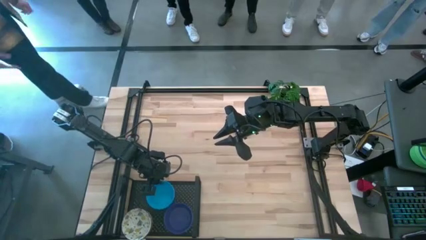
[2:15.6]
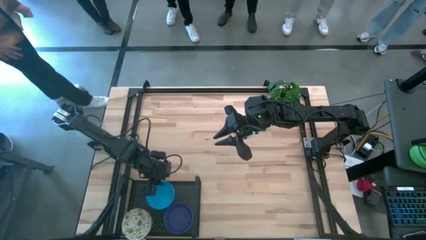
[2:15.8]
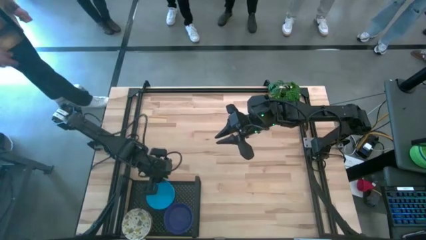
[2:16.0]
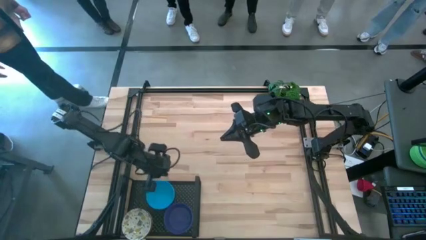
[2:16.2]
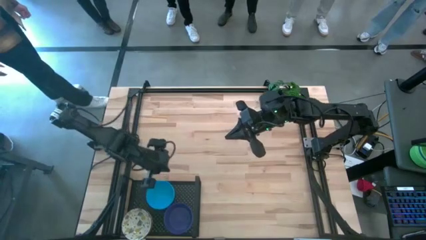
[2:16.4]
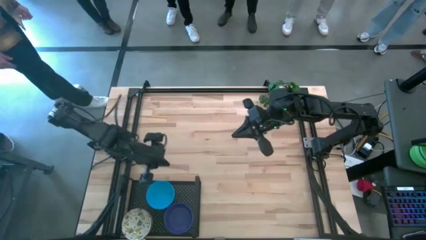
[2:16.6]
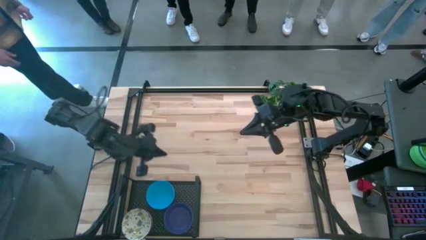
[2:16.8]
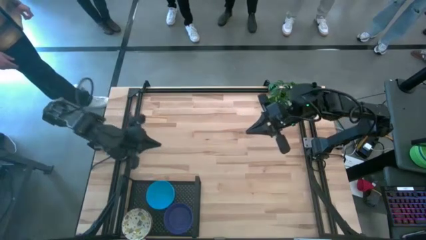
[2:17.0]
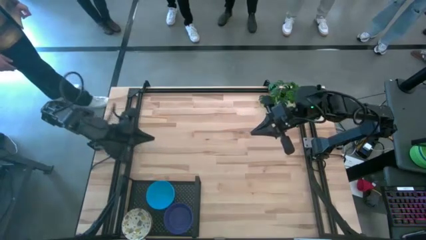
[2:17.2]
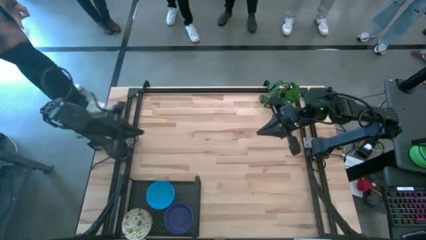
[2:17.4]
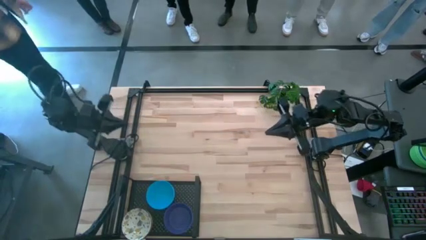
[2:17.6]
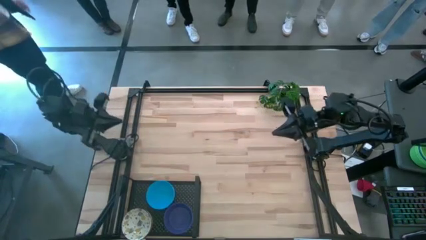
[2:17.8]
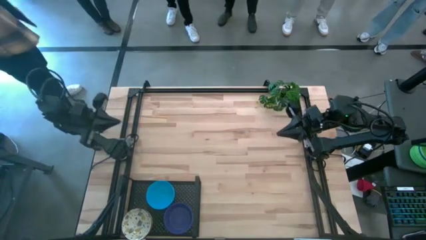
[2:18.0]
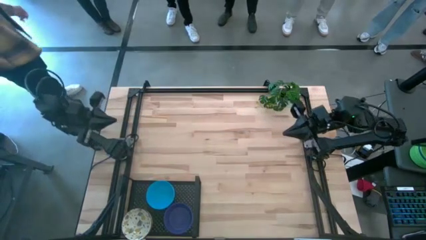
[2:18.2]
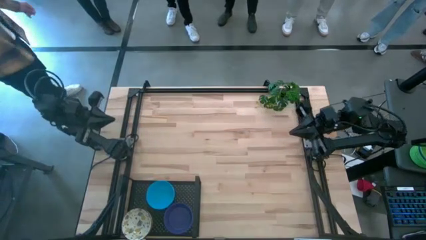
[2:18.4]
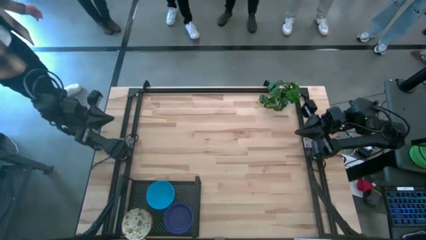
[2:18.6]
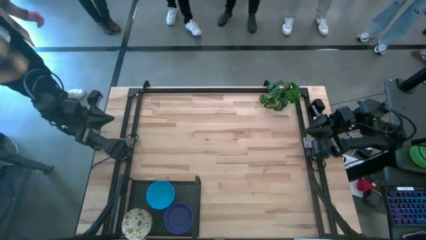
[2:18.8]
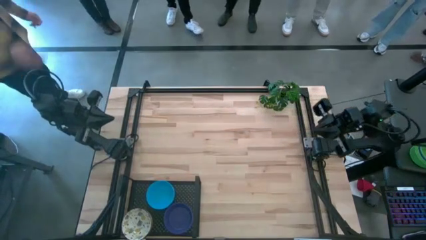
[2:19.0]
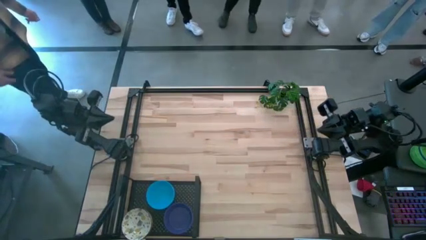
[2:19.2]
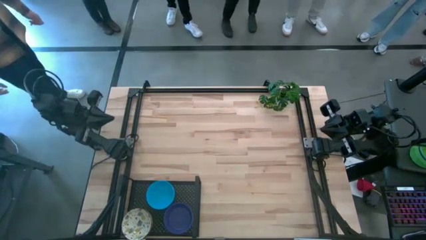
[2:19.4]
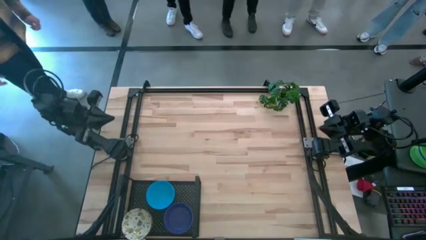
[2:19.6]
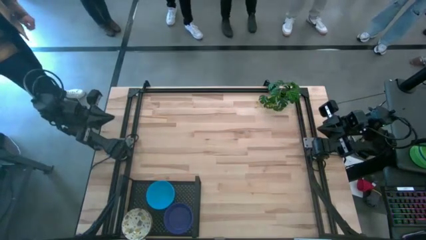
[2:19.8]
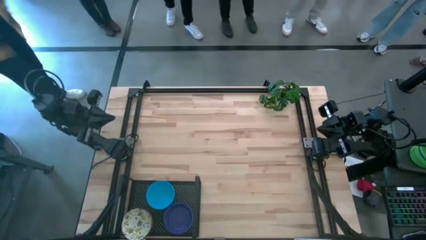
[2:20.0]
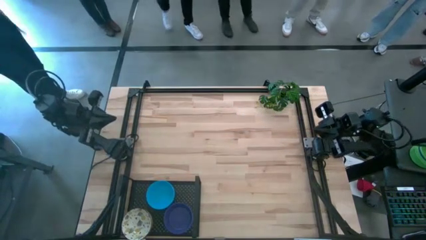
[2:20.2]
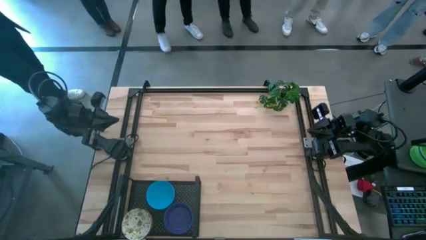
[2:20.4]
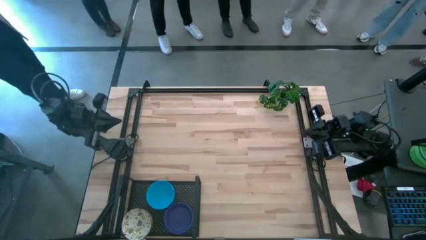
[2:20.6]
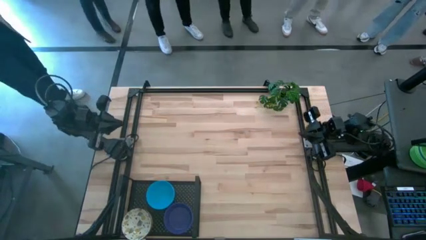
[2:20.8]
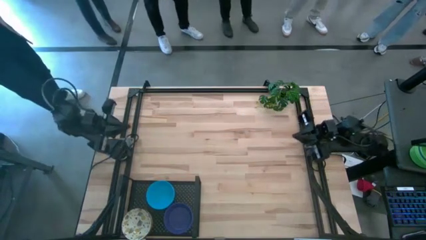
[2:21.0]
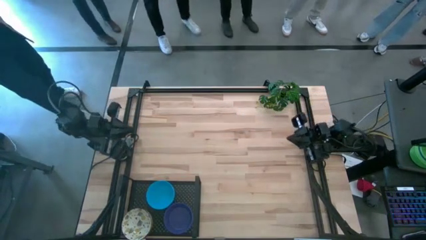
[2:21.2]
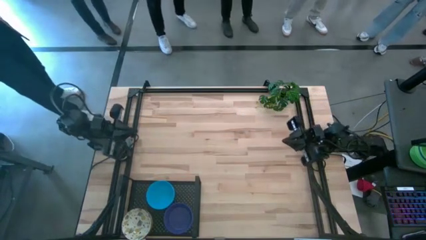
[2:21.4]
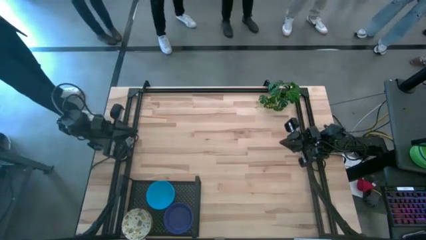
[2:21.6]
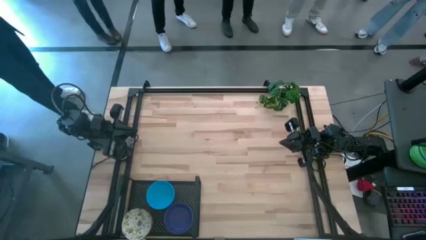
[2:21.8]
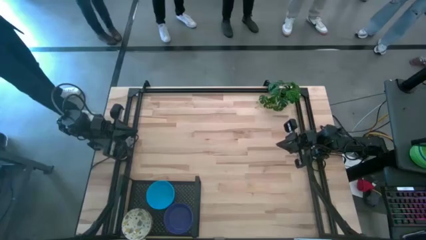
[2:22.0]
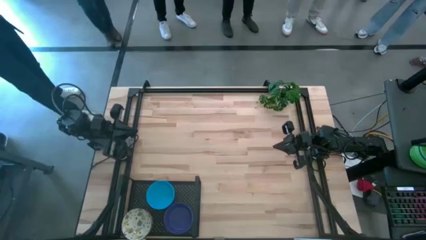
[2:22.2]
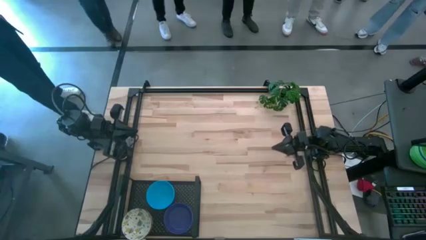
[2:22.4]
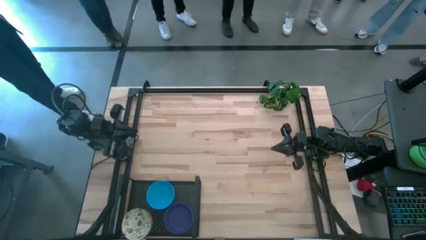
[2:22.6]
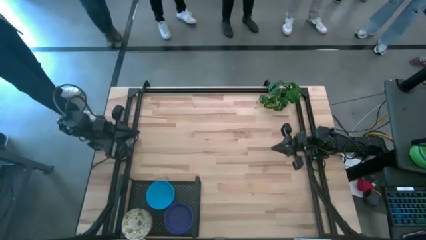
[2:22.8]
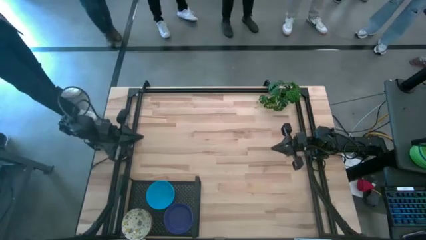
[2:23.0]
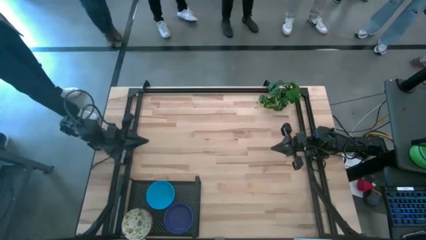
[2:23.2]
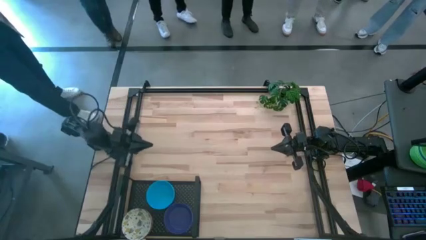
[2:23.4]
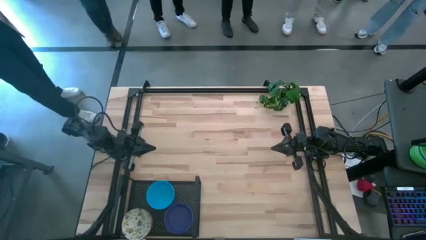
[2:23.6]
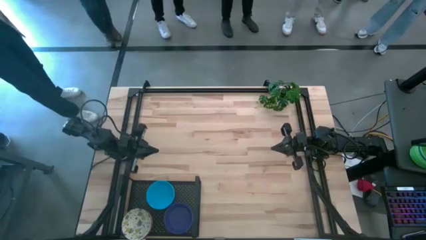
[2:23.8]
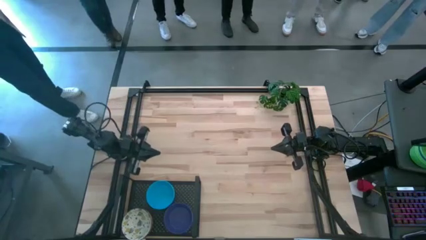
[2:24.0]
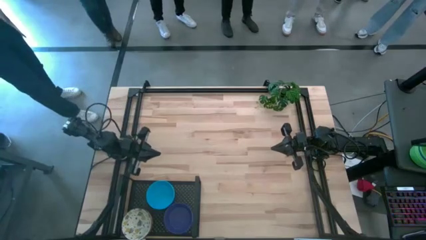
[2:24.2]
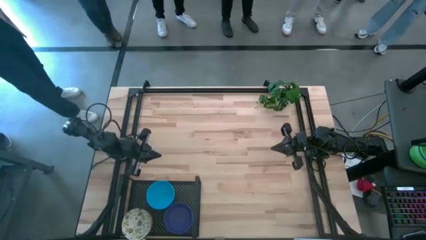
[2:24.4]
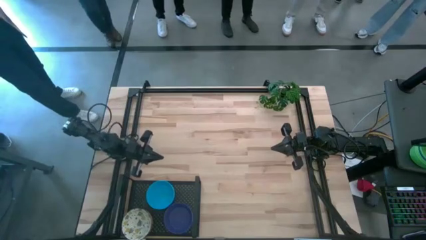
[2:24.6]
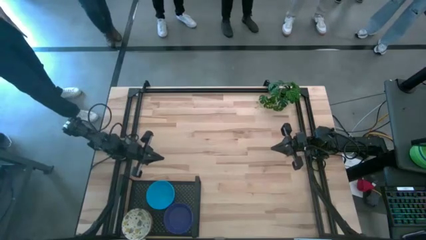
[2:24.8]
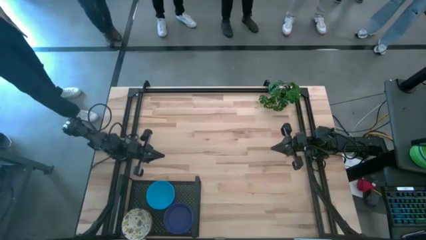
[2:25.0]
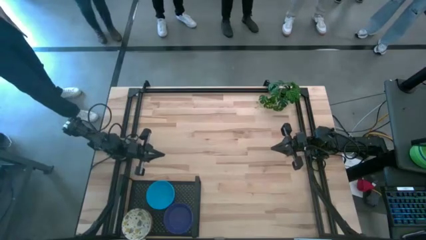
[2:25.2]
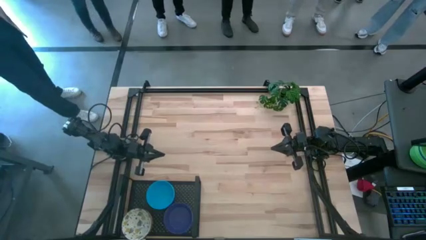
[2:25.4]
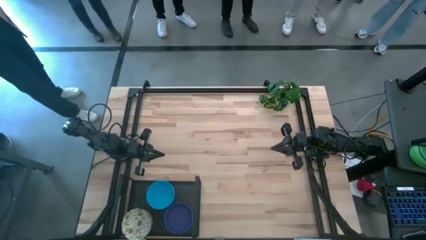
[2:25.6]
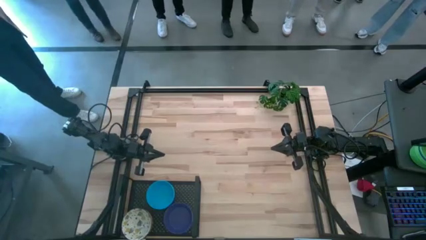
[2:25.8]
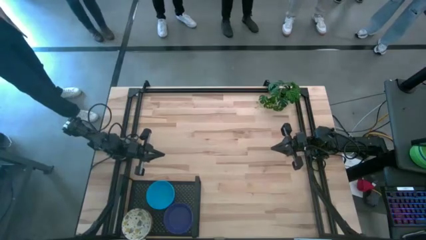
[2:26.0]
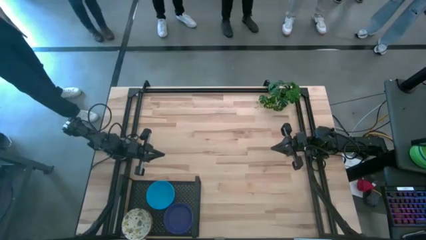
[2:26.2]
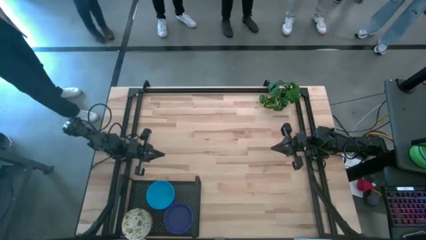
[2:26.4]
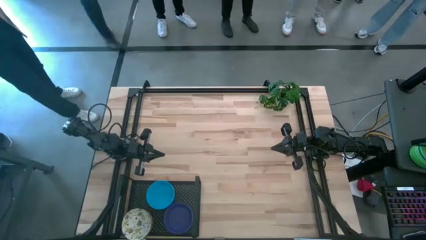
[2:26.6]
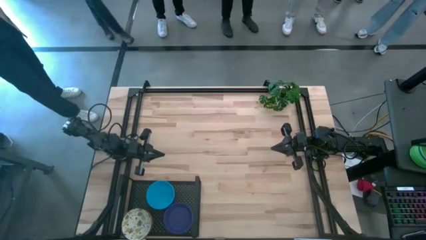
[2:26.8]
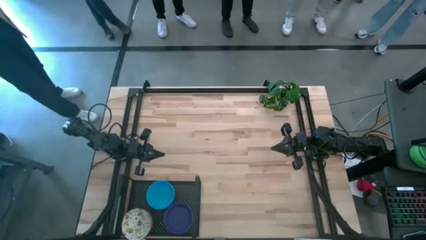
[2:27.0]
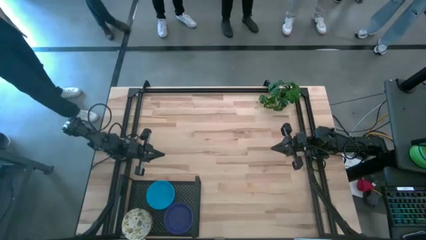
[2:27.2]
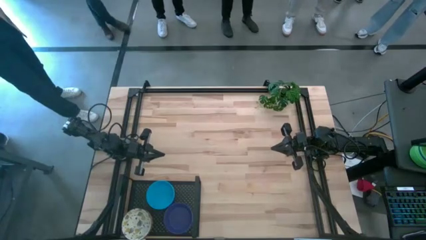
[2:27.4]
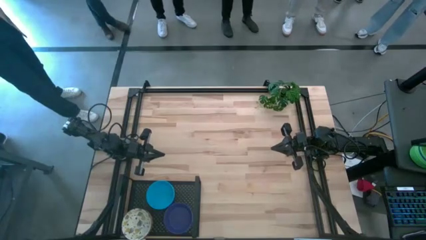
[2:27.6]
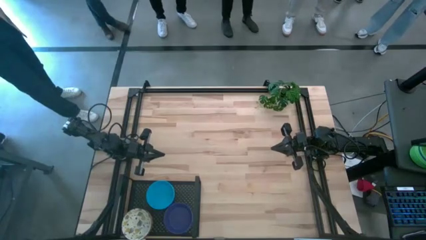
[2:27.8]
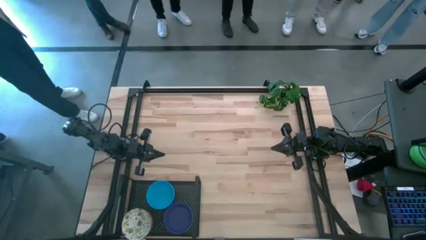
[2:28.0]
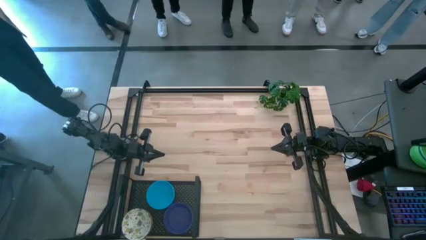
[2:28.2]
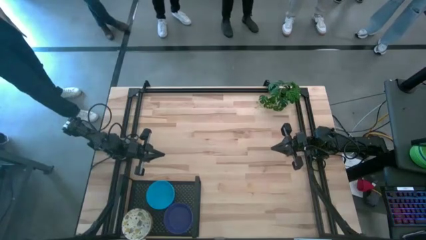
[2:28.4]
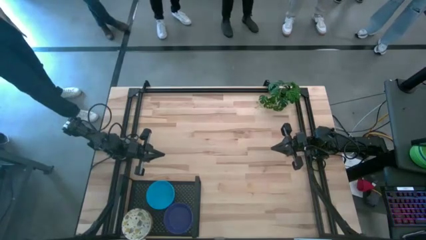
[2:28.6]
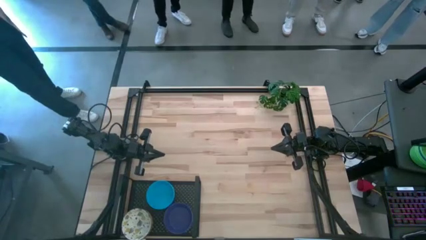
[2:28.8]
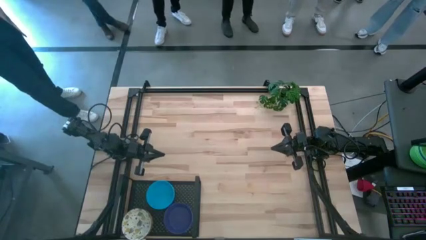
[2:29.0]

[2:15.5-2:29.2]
Task: Pick & Place Mini bowls
Return to Home Position
